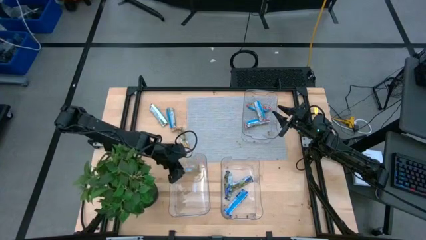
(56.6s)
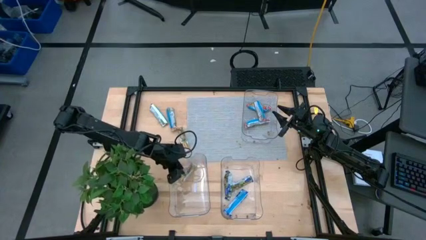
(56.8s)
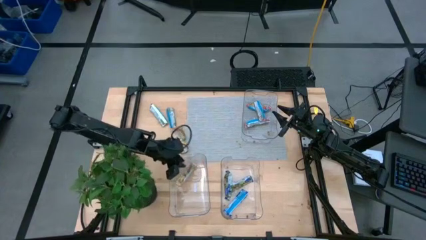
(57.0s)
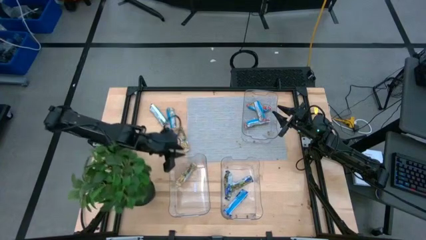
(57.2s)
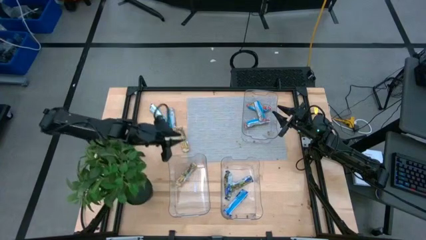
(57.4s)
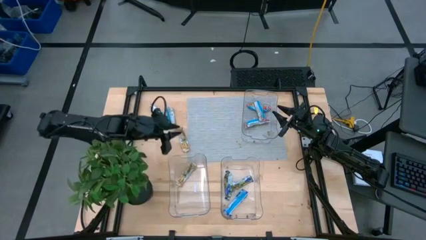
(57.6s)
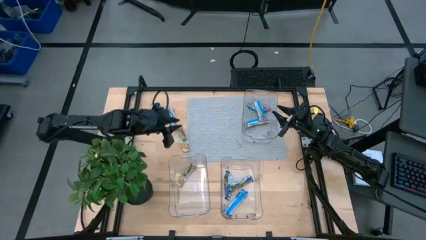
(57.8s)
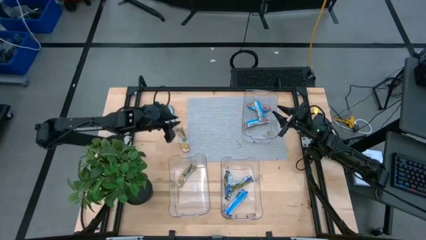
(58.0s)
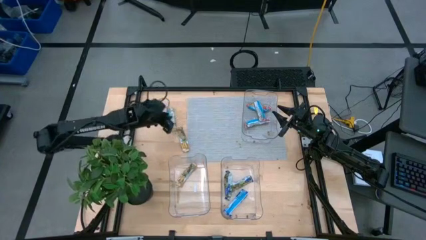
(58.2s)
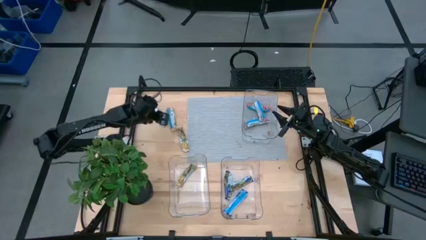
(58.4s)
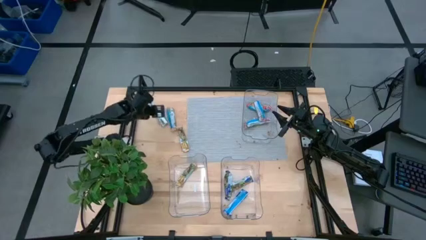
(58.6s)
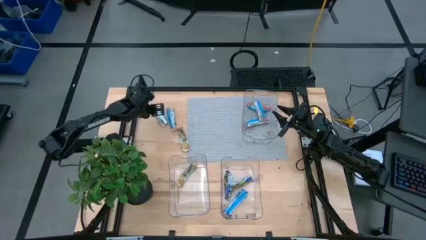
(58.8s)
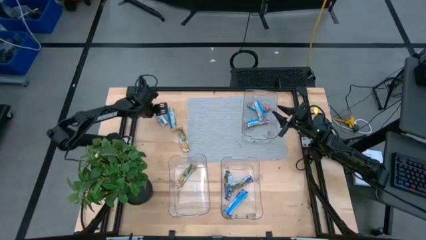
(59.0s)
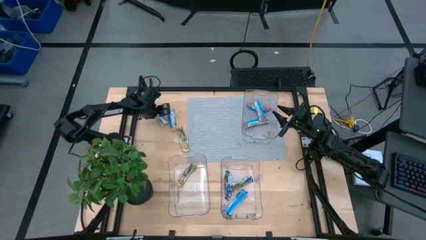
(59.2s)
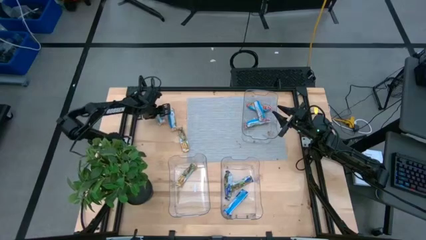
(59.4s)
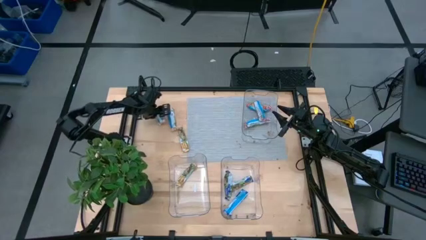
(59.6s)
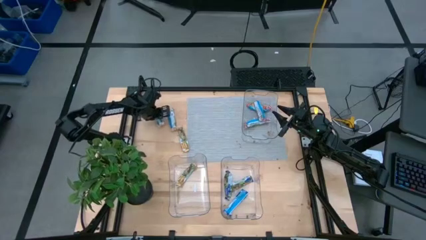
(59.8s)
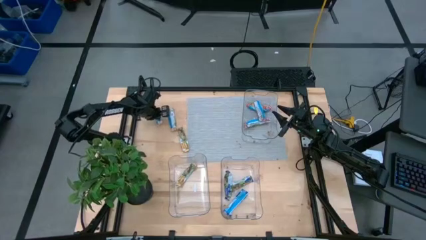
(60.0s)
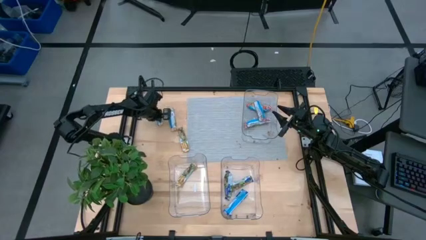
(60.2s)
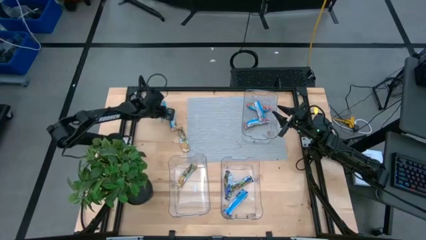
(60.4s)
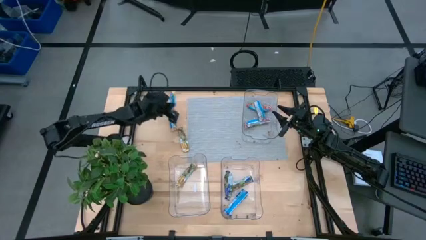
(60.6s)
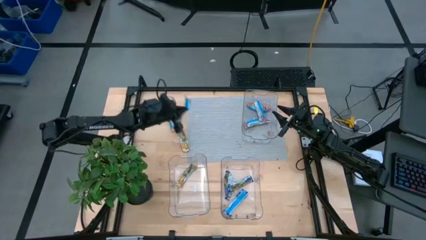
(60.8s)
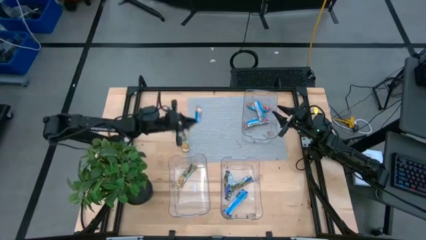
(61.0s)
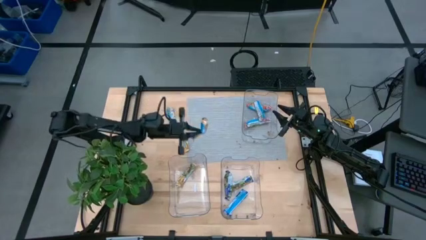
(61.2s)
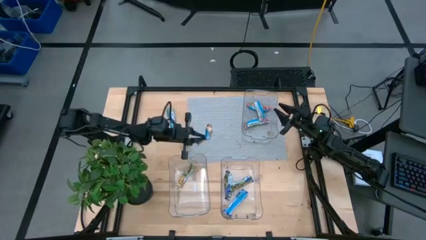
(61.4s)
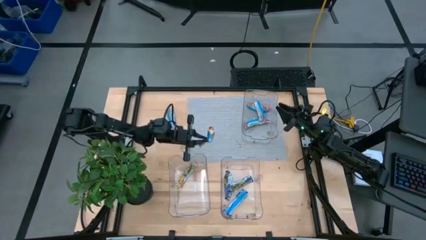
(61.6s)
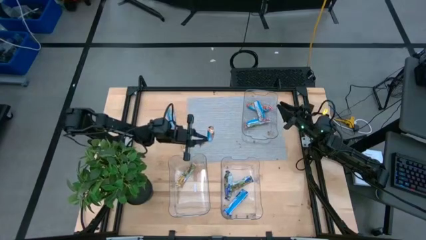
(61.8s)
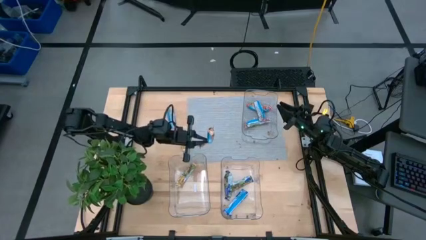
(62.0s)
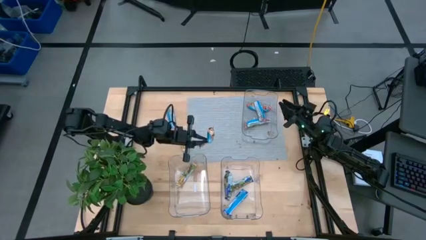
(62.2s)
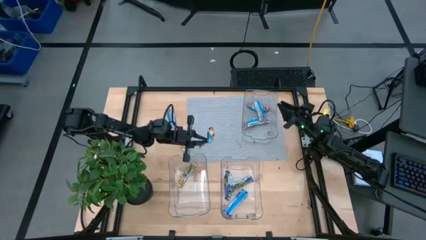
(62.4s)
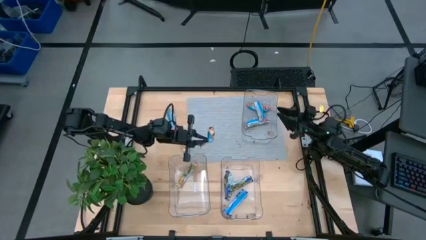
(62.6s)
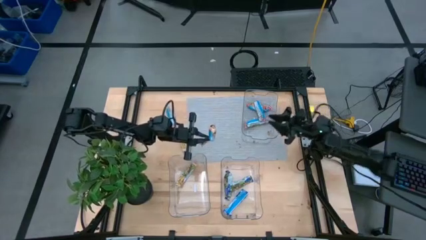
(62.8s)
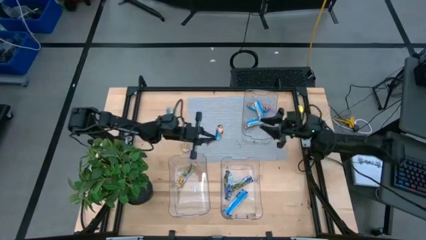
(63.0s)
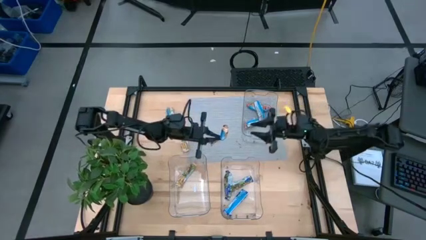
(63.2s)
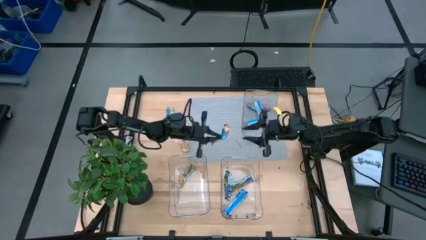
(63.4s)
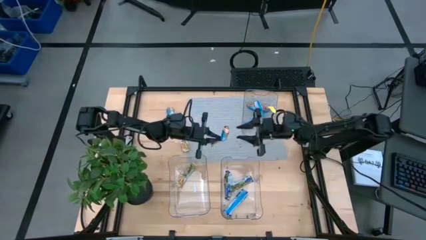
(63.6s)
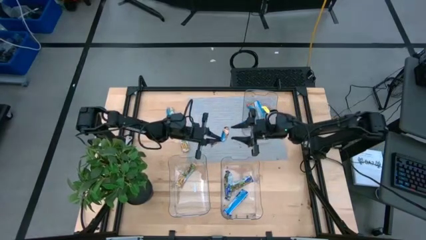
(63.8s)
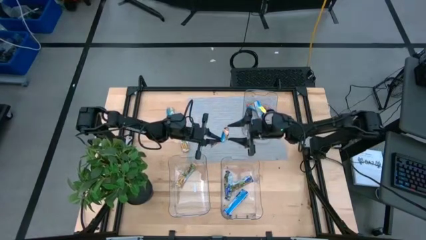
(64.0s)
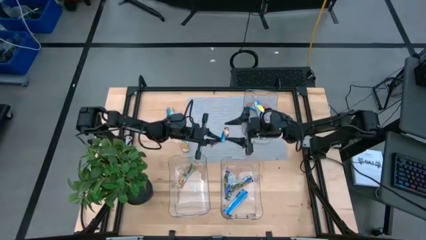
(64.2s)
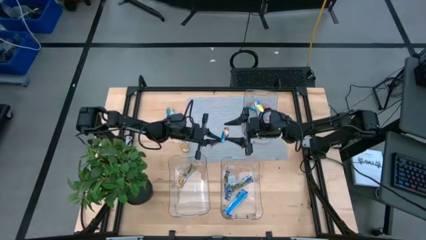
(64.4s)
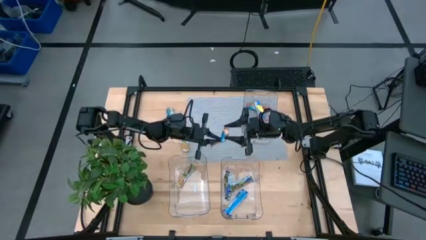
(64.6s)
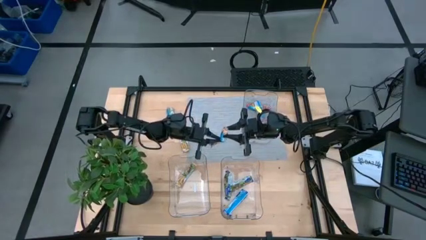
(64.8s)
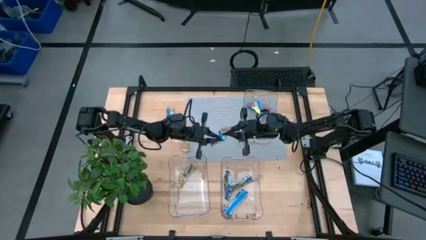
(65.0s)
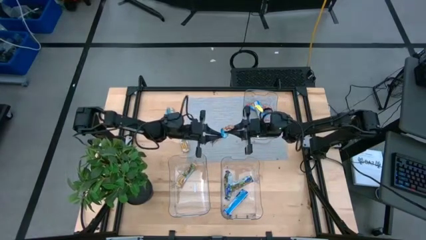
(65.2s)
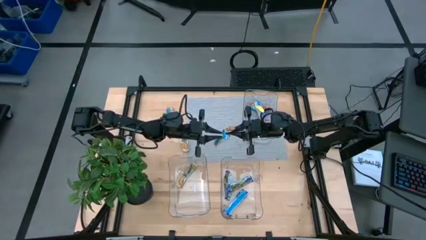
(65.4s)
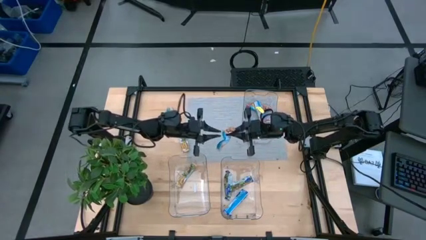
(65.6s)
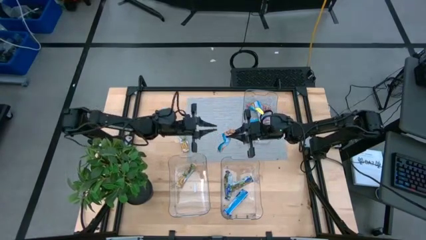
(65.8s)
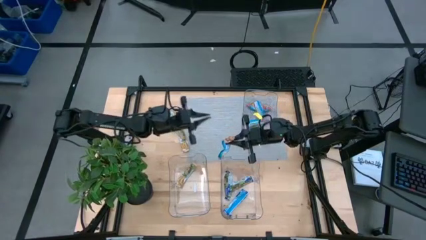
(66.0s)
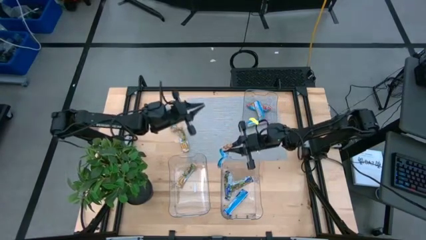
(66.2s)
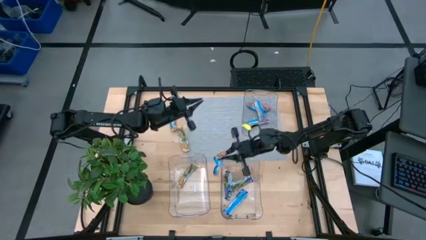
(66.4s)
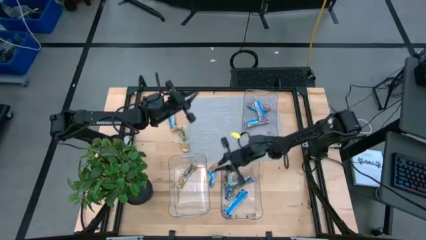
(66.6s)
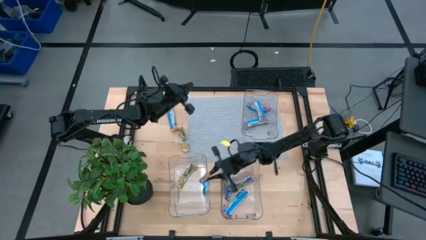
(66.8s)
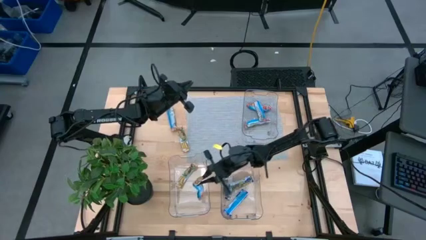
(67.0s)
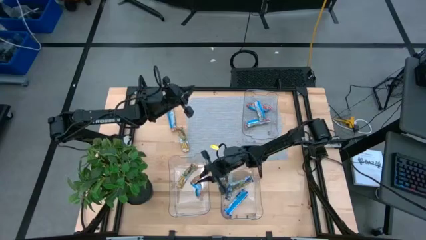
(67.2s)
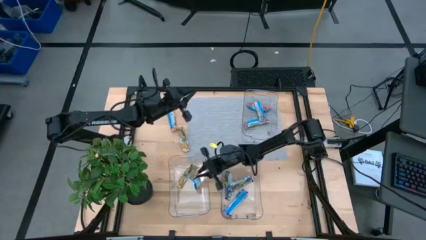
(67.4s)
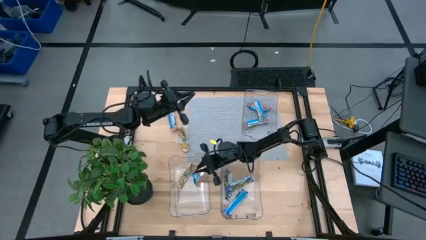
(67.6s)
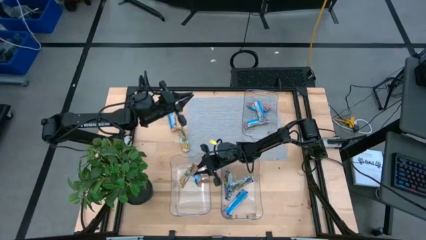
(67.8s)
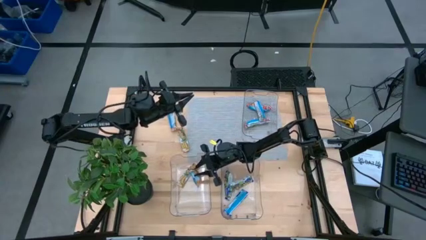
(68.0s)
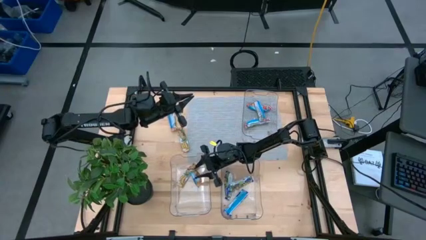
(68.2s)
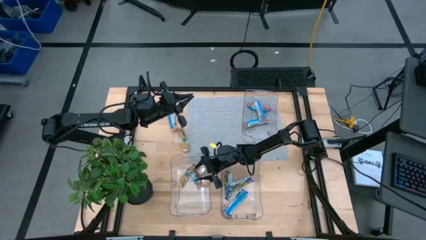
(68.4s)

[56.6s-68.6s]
Task: Pick and place Granola Bars by type
Put the top left yellow granola bar into the bottom left transparent bin

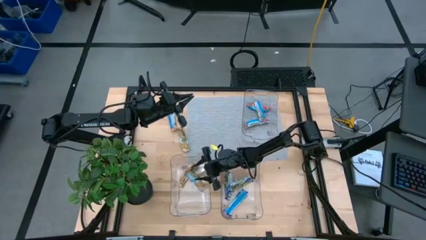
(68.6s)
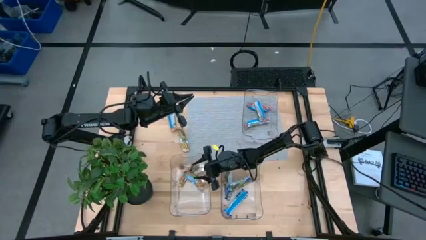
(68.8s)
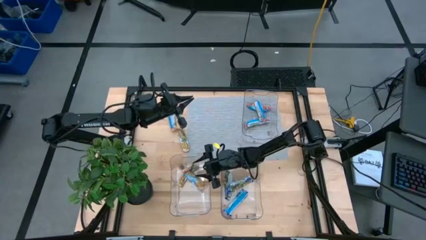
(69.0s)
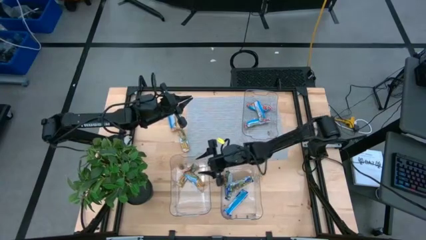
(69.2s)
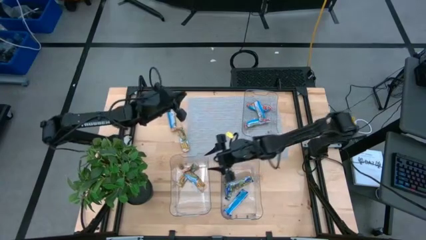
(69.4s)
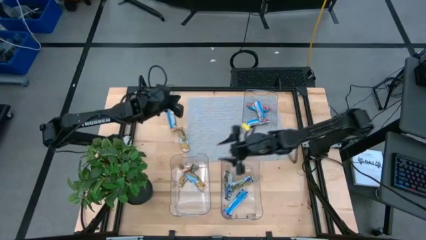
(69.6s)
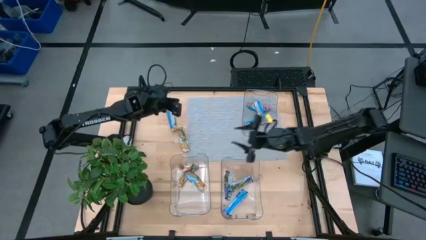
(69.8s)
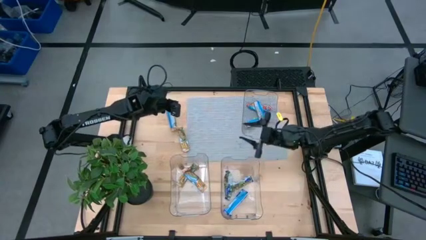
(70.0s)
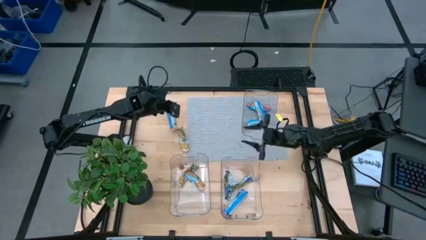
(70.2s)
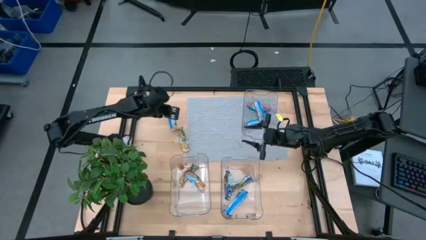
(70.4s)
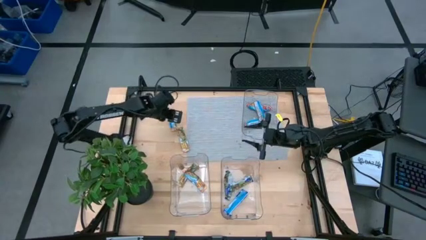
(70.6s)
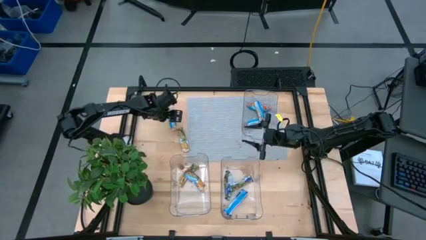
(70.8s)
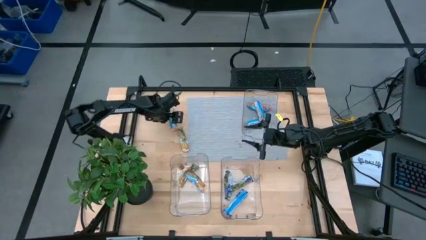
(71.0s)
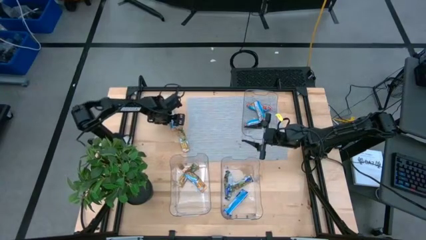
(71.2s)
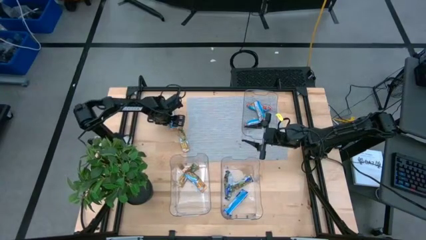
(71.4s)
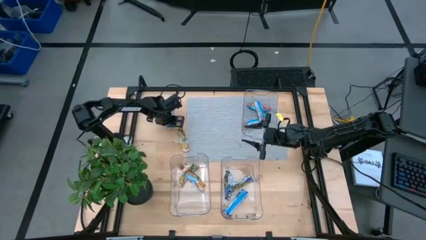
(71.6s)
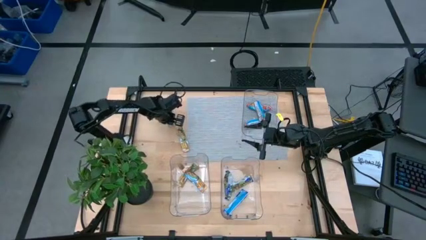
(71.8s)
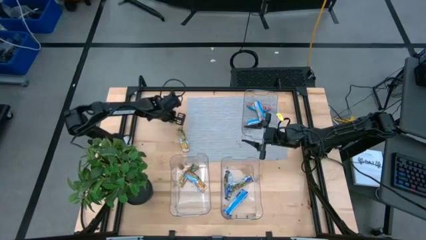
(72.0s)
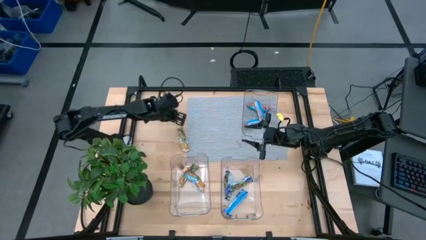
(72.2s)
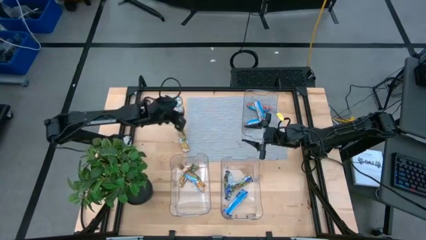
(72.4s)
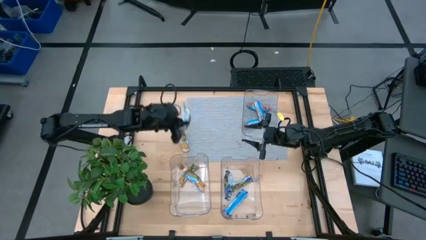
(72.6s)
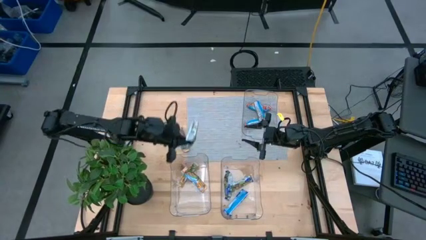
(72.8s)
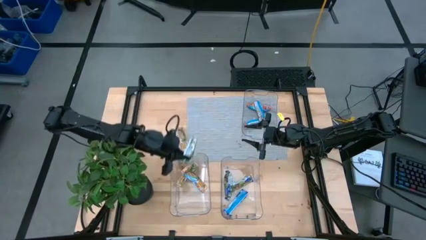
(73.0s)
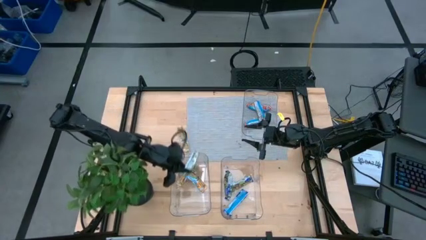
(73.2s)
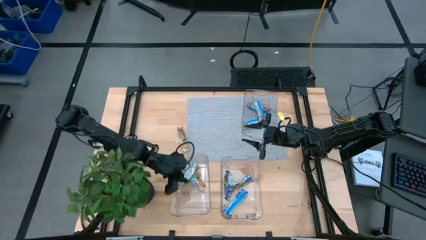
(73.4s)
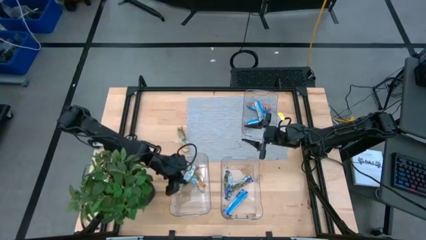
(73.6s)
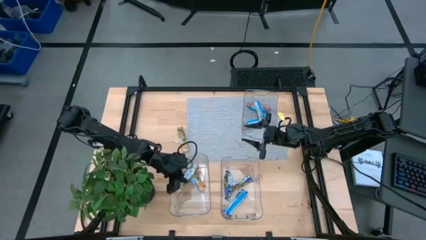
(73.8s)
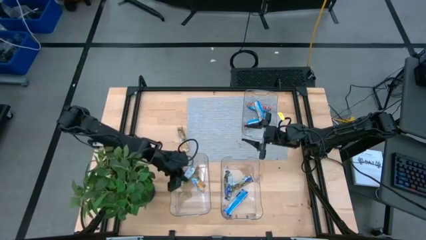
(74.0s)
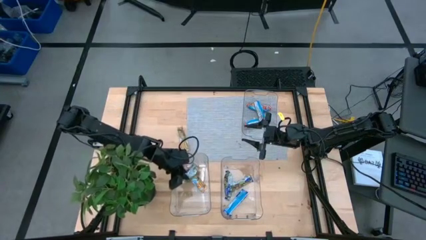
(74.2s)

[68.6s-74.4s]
Put the top yellow granola bar into the bottom left transparent bin
